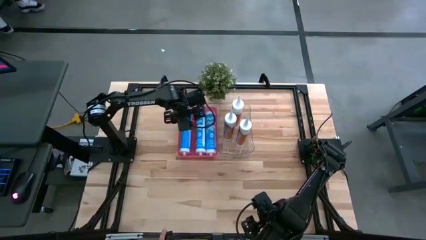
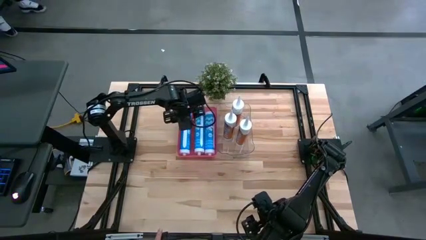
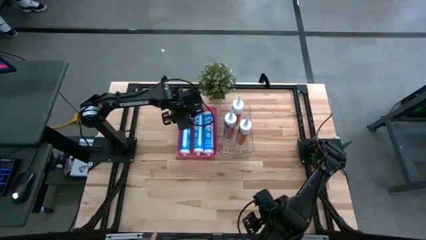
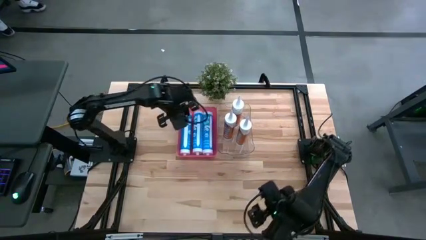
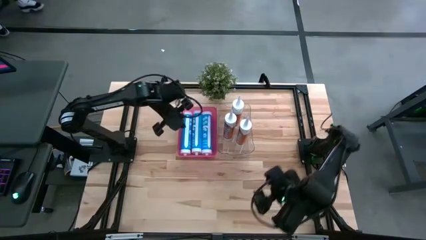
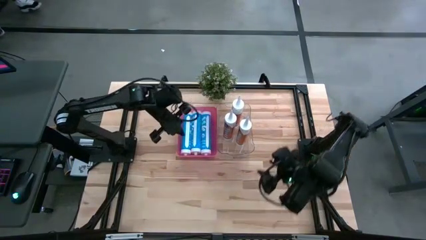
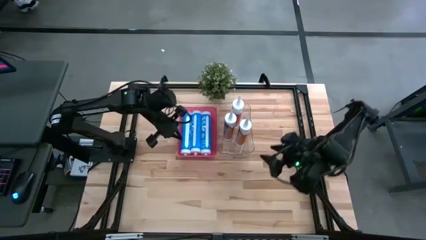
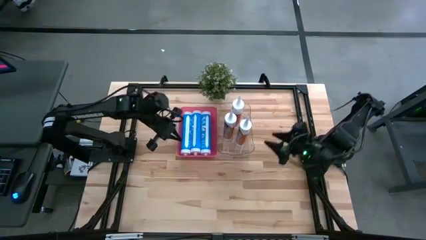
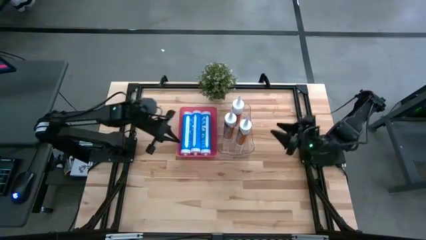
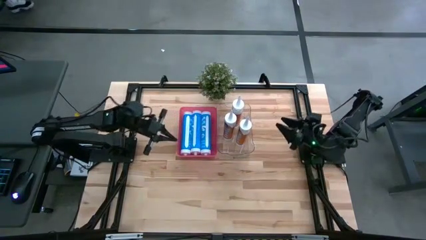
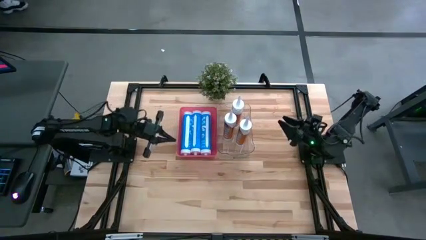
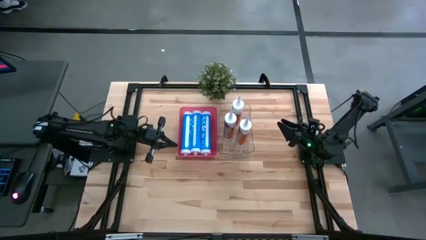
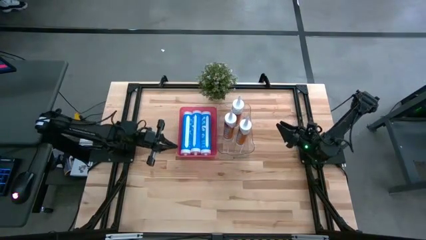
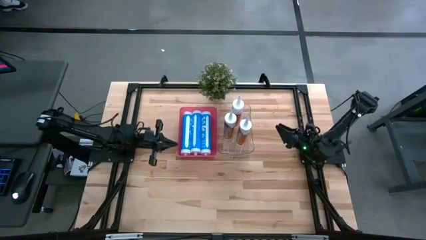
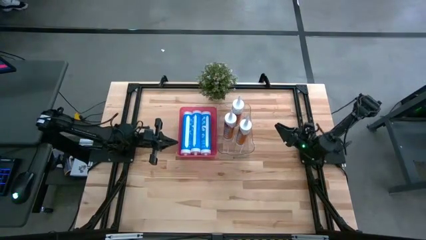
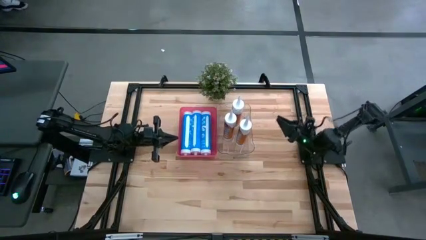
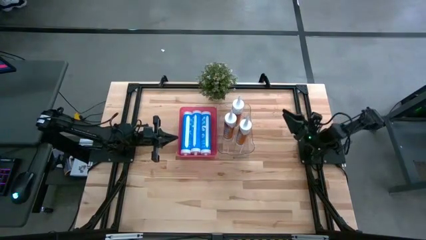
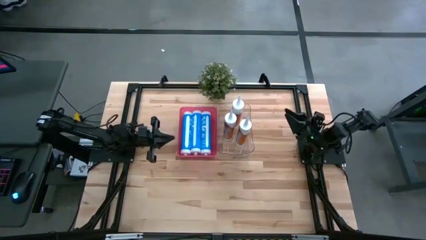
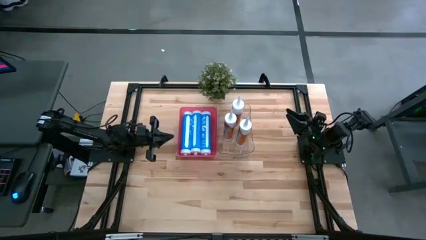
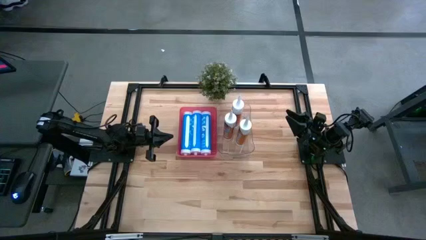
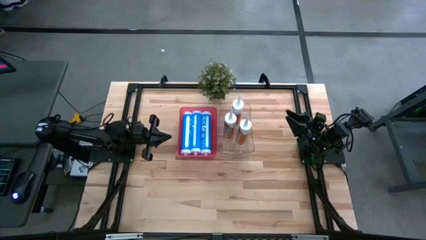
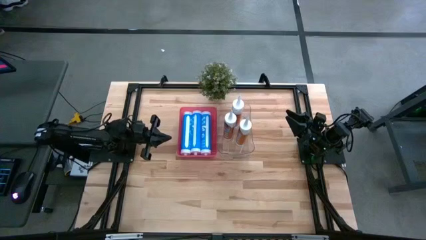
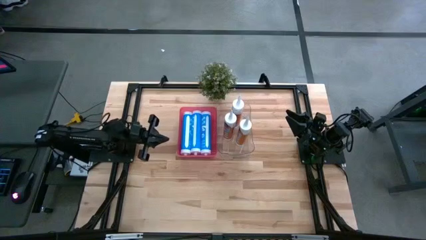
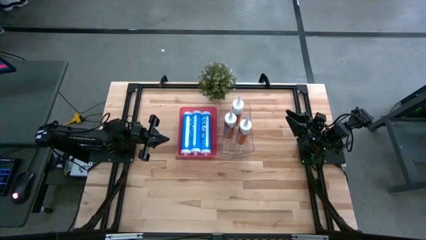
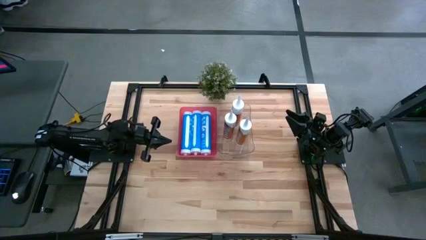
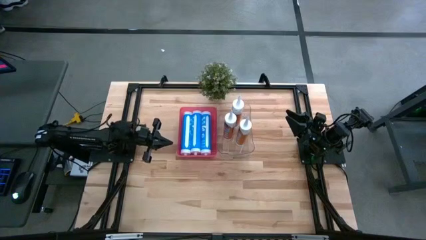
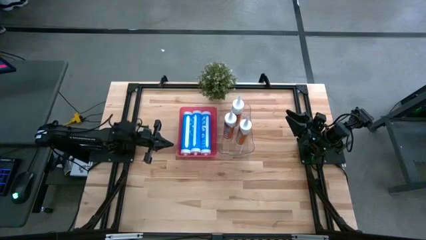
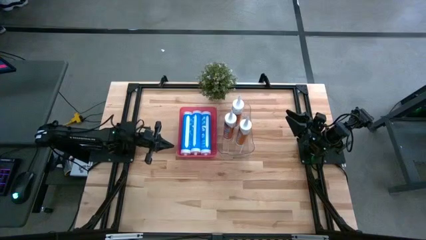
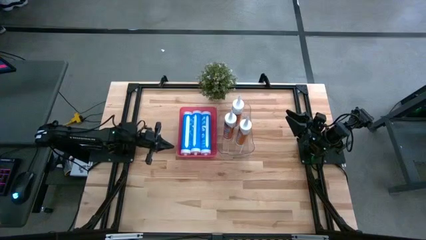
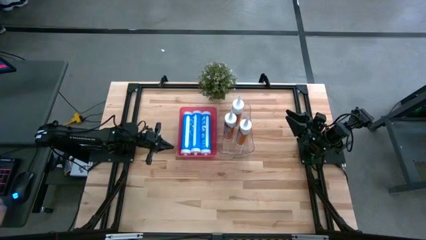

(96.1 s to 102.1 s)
Task: Pick & place silicon tubes, Sealant and Lysol wipes
Return to Home Position

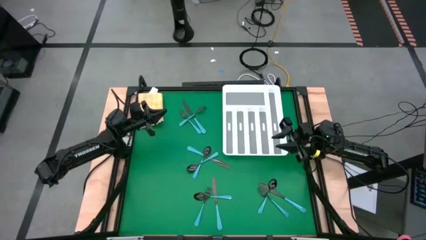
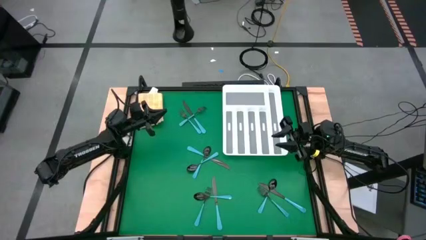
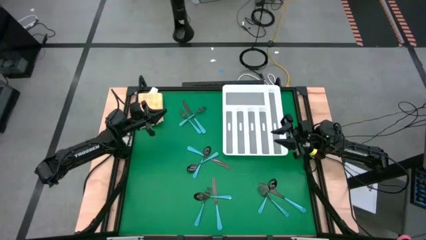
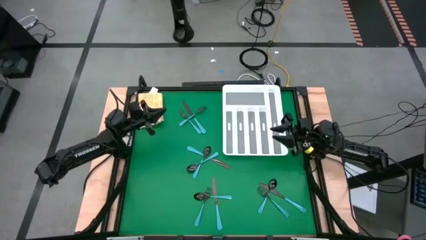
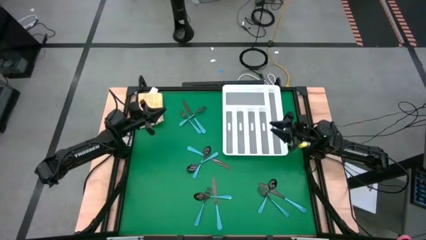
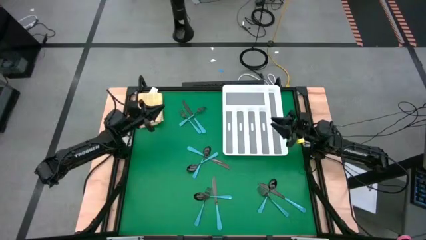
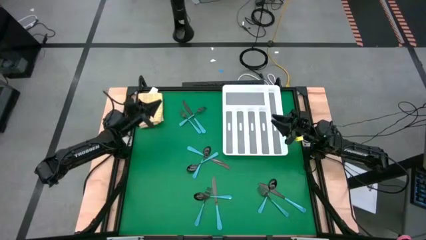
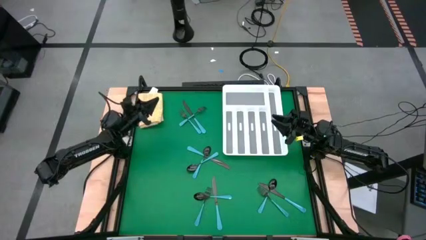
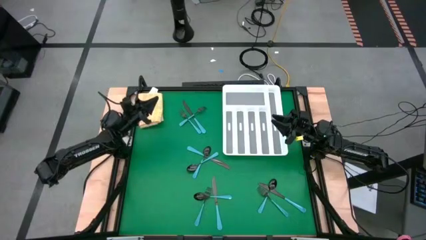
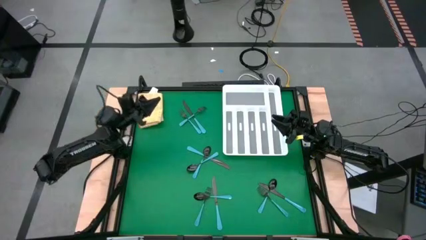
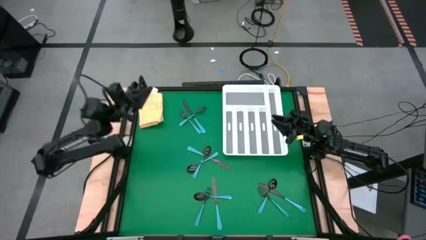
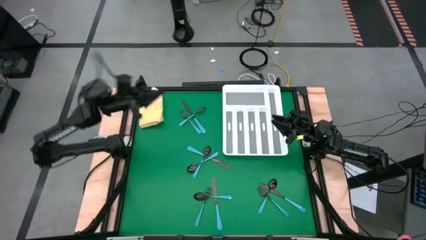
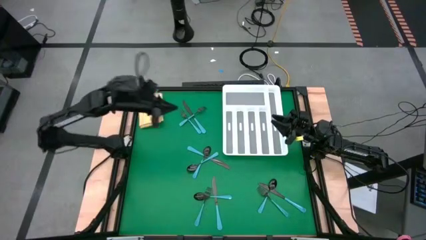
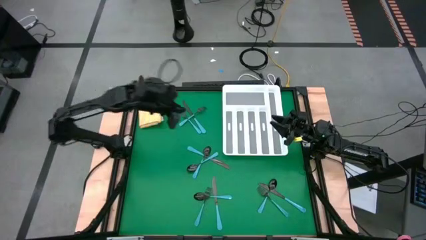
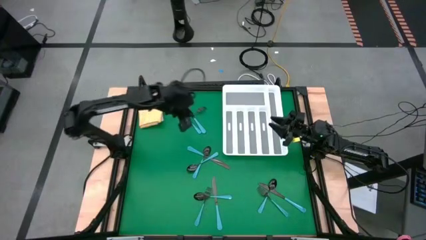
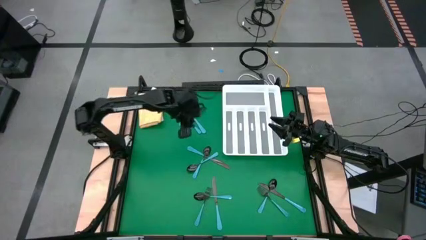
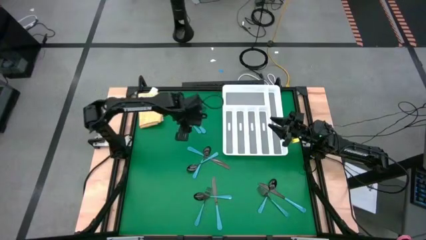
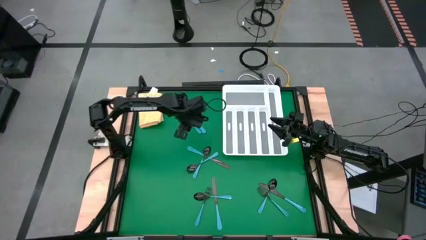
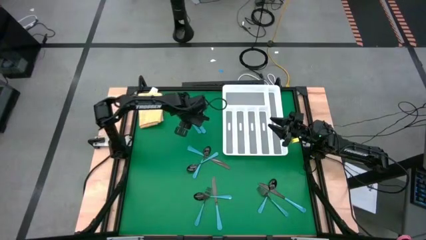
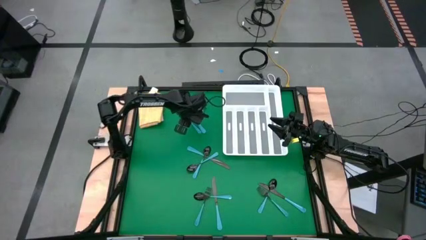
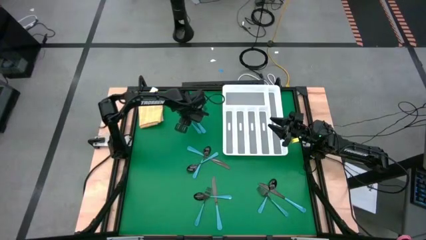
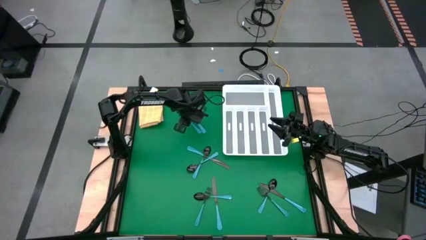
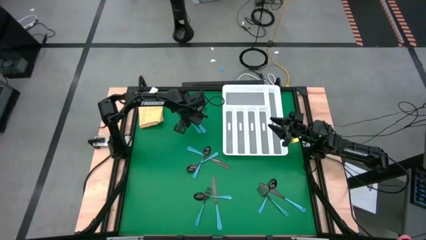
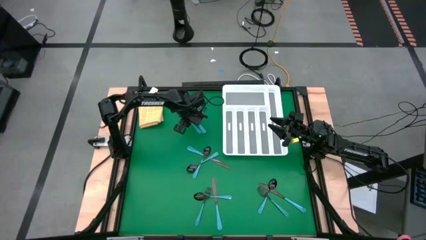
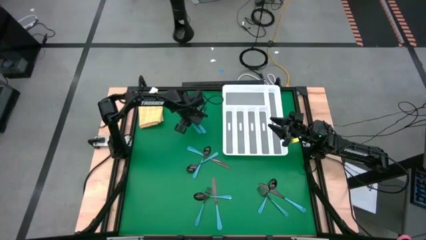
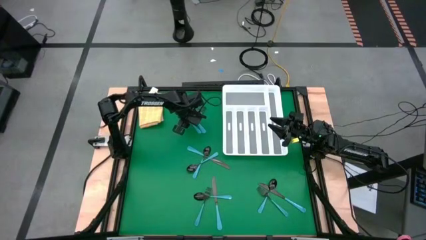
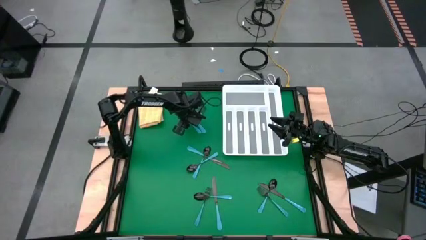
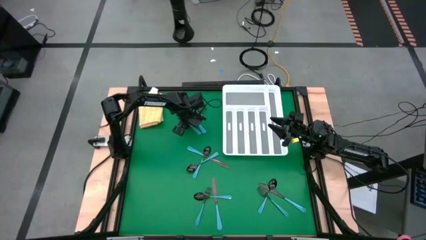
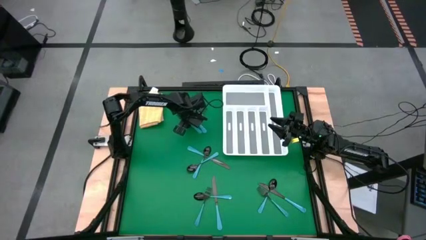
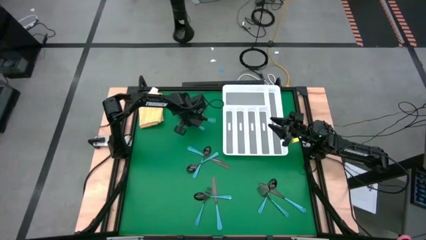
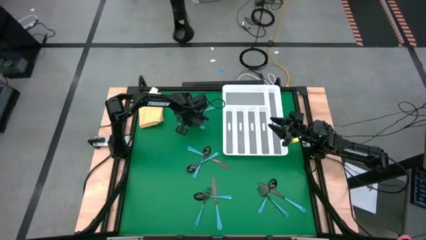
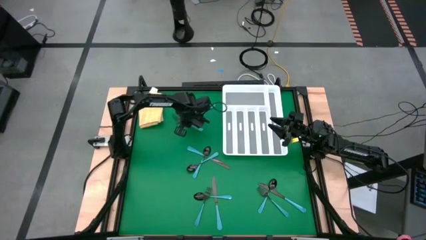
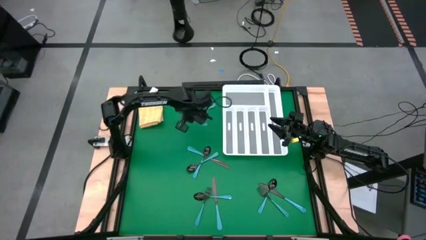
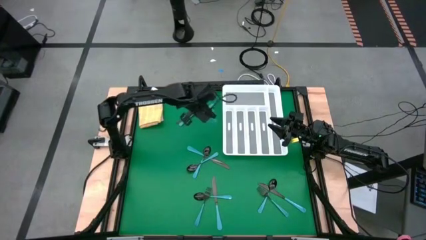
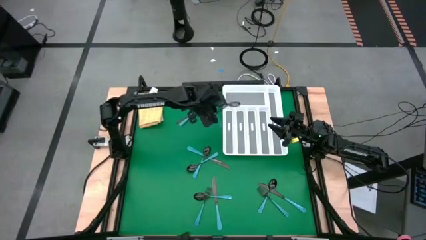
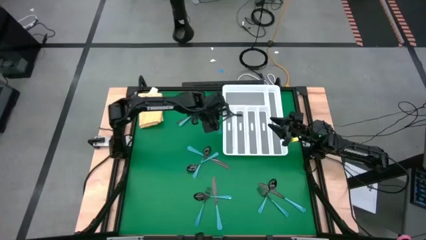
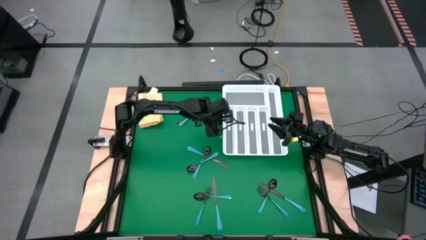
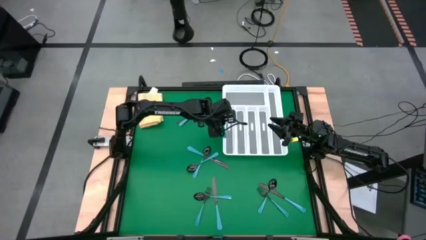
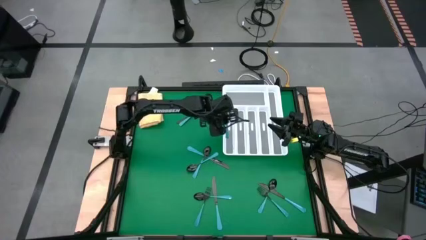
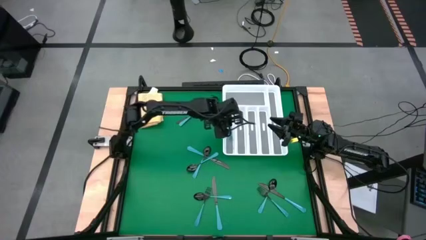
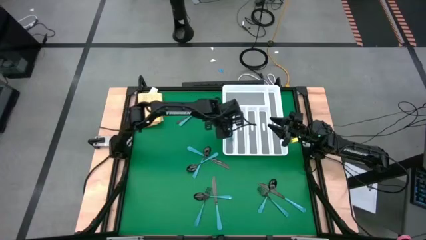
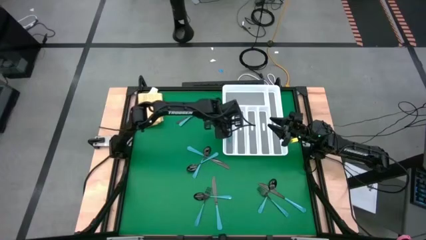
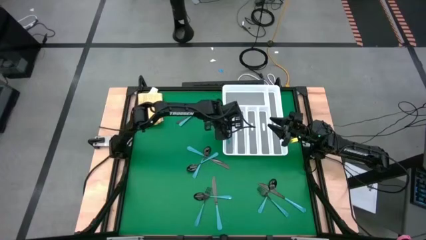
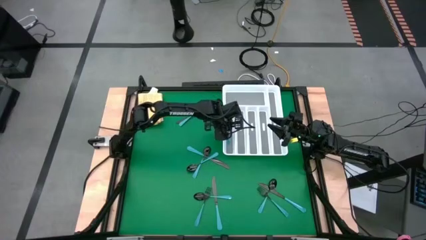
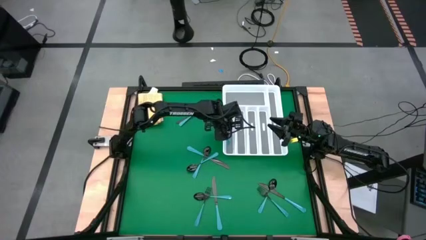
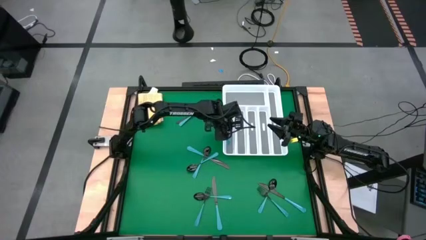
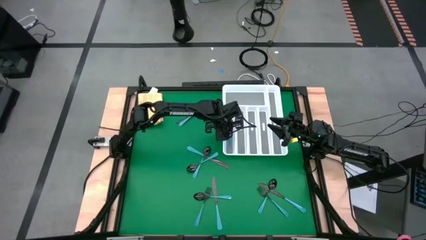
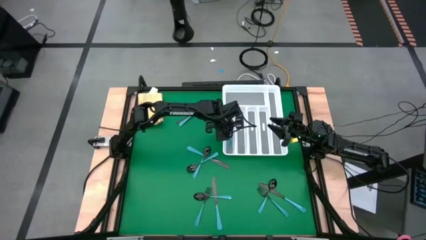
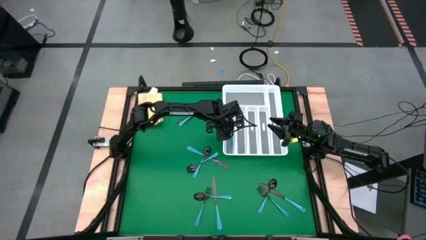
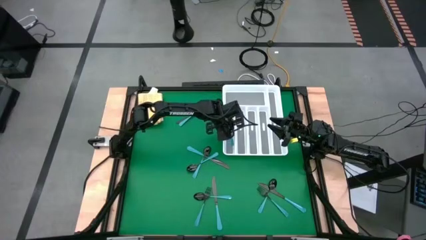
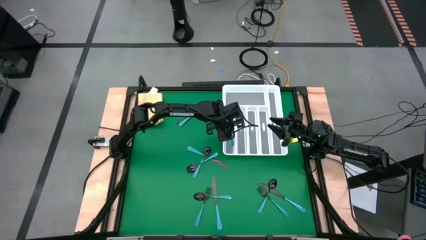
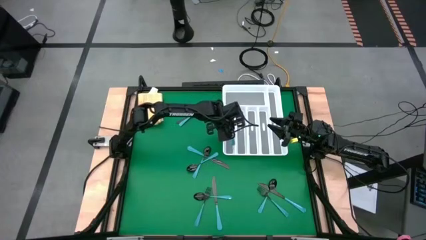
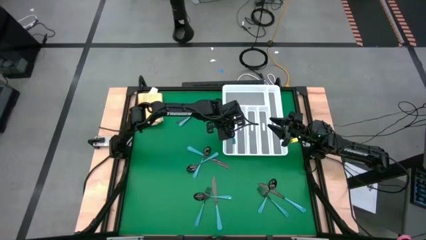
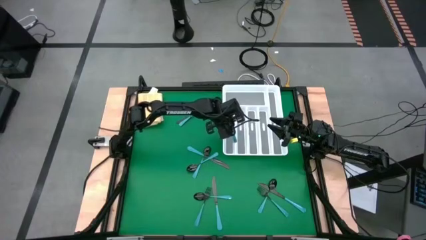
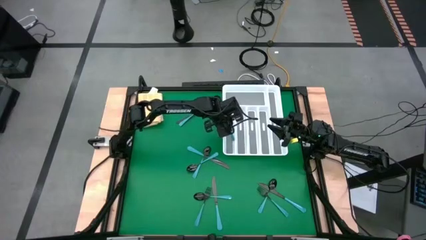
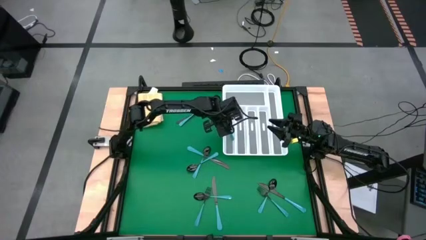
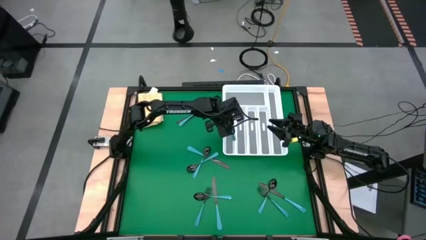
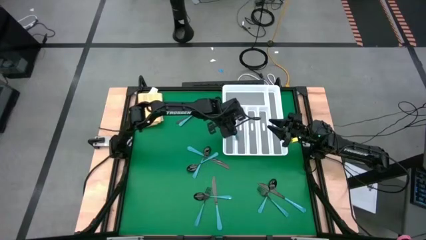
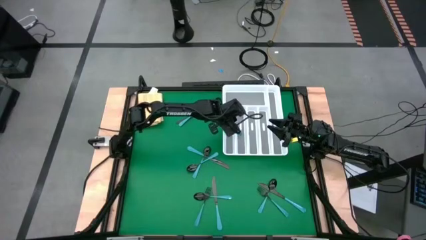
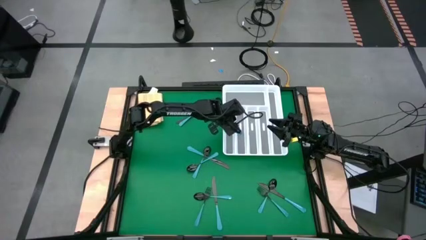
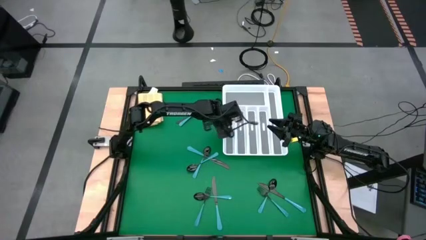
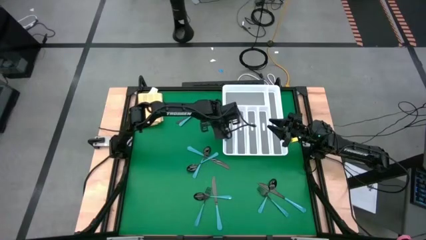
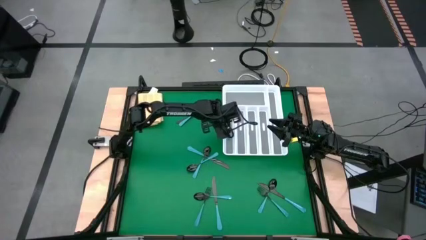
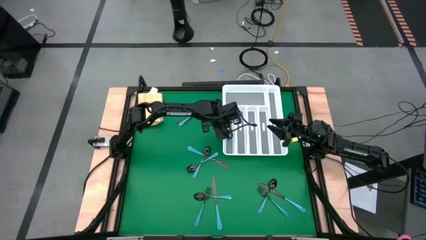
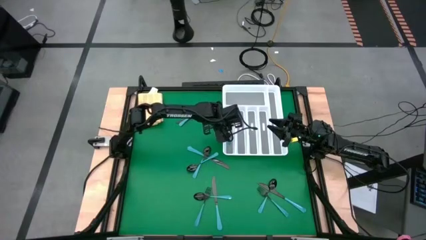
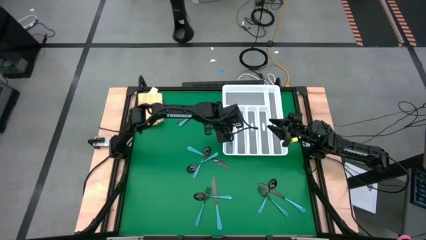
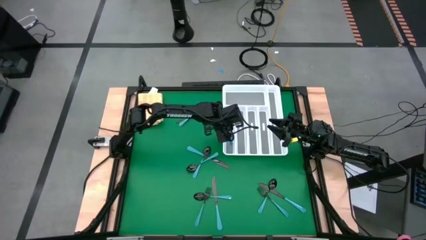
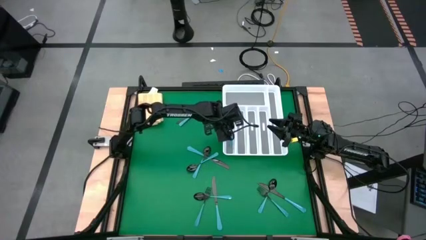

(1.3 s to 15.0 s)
Task: Sort silverware
Put the blue fork into the silverware organizer
